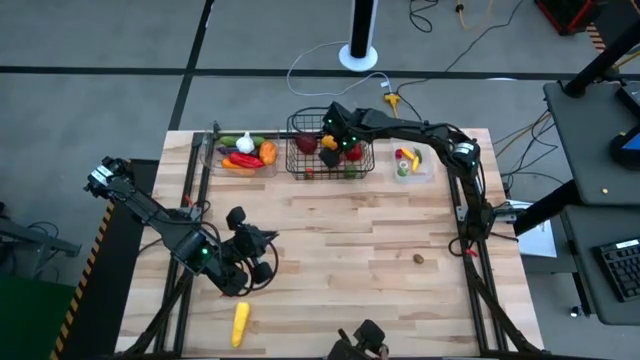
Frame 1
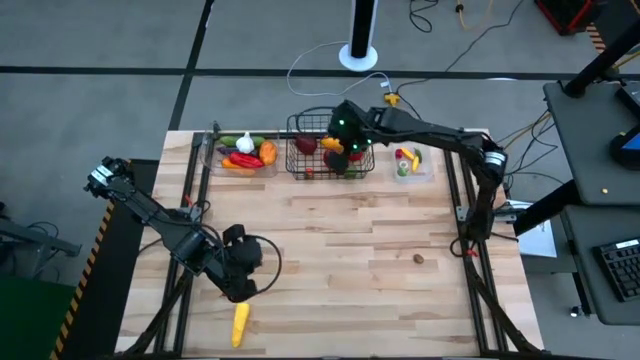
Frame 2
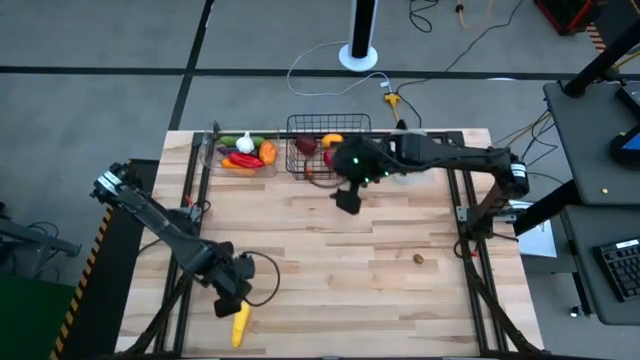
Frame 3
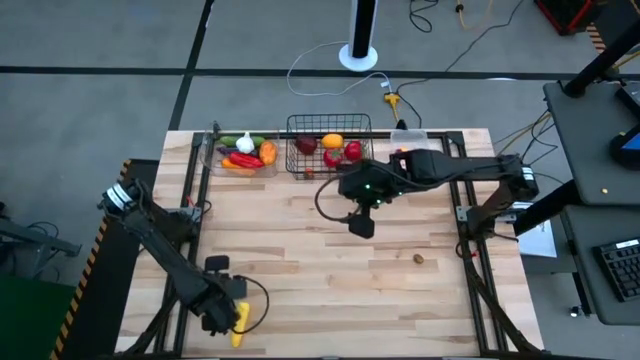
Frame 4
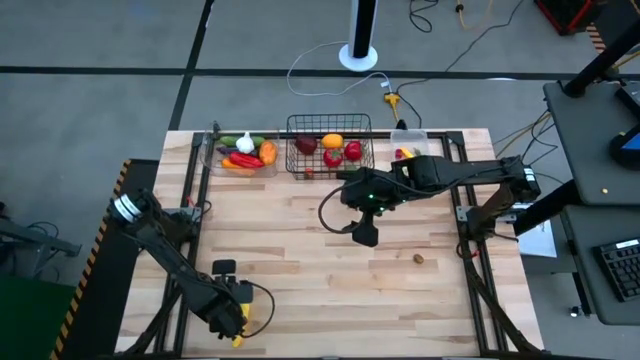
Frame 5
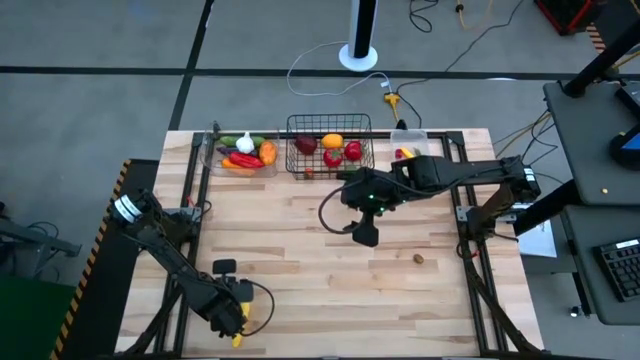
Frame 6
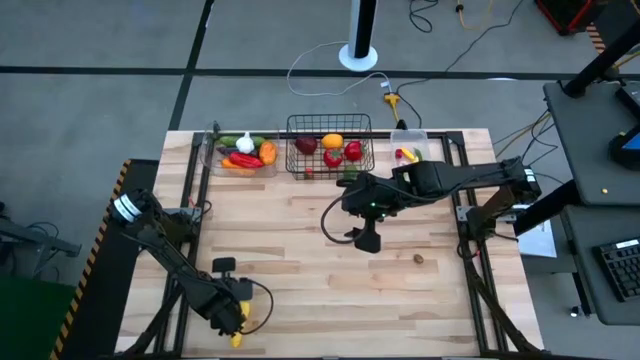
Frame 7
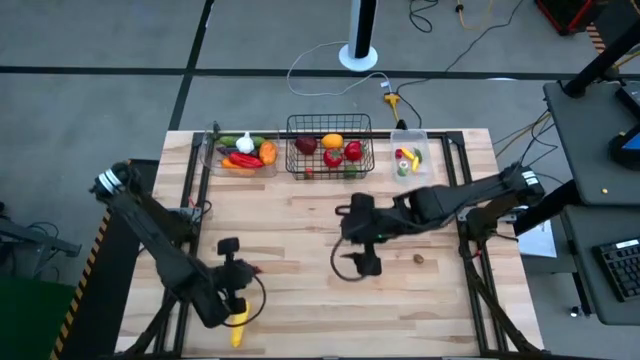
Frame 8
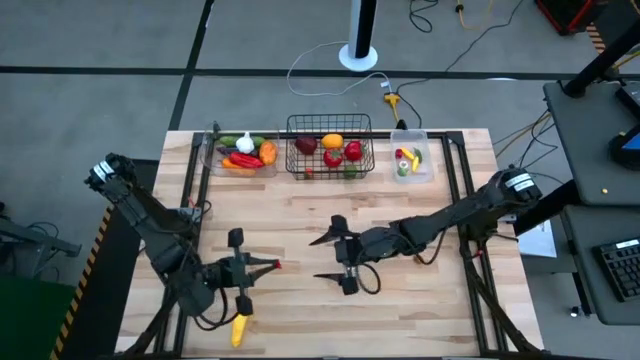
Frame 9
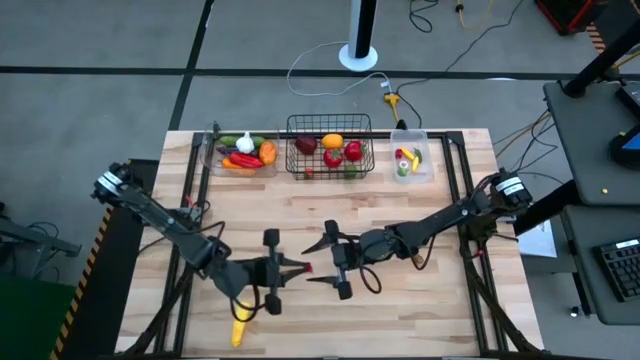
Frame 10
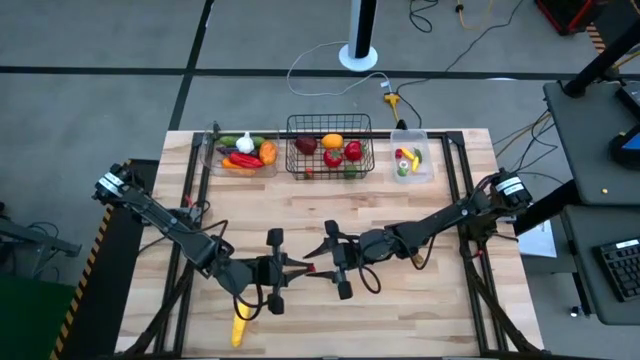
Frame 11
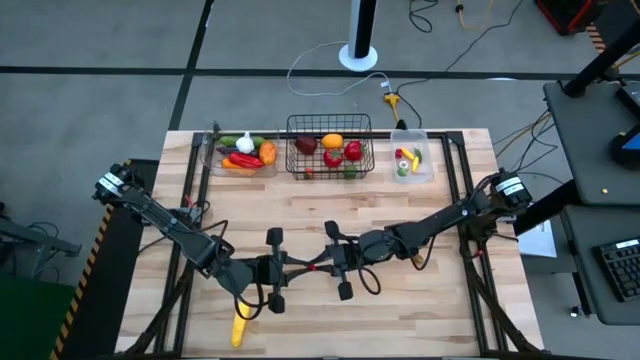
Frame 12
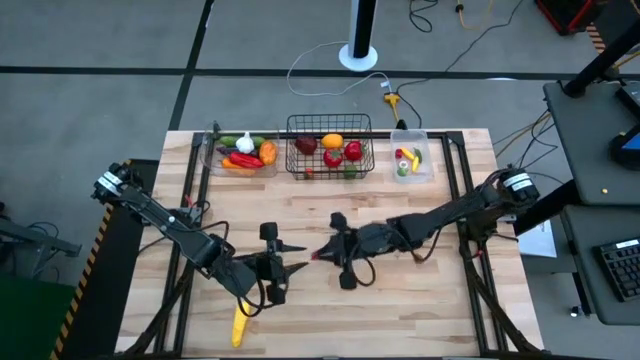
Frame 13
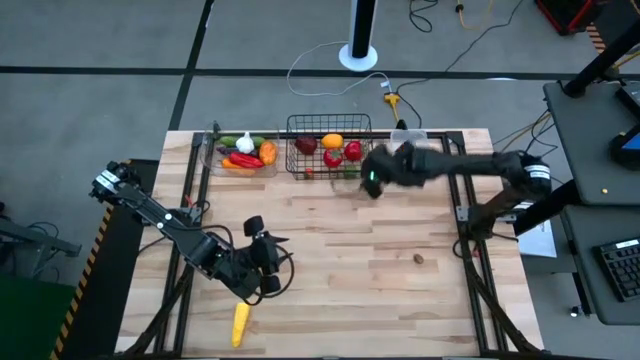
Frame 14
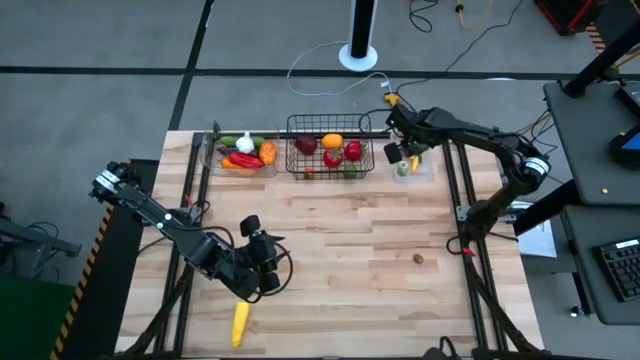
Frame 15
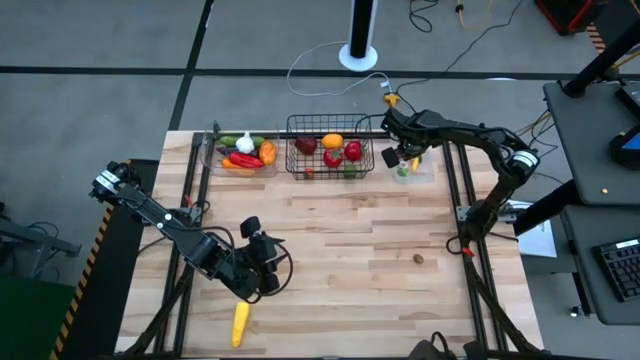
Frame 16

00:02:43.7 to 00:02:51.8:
Task: Sort produce into baskets
Put the red jalapeno pepper into the white bin

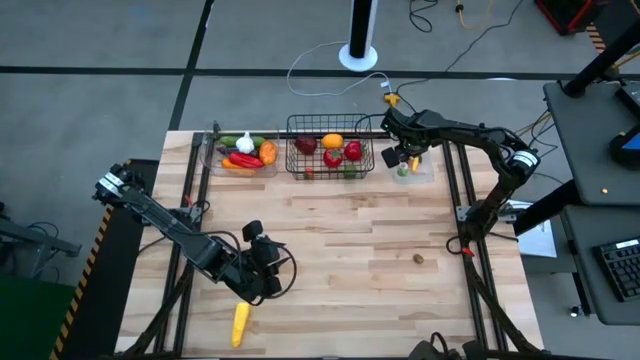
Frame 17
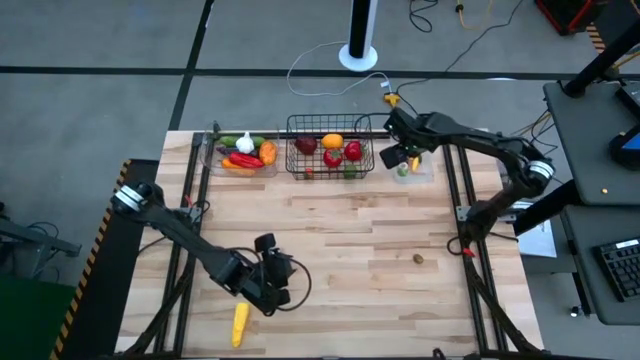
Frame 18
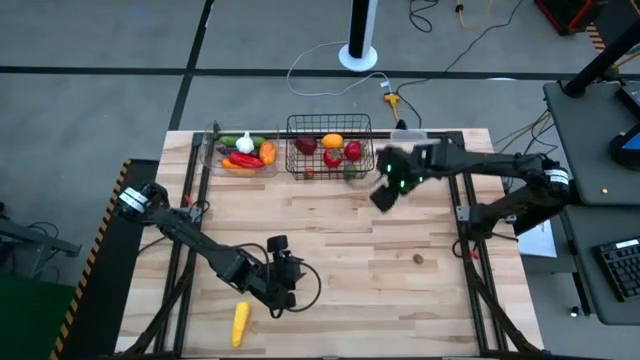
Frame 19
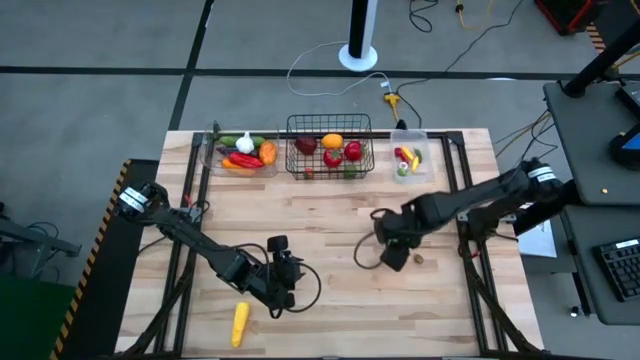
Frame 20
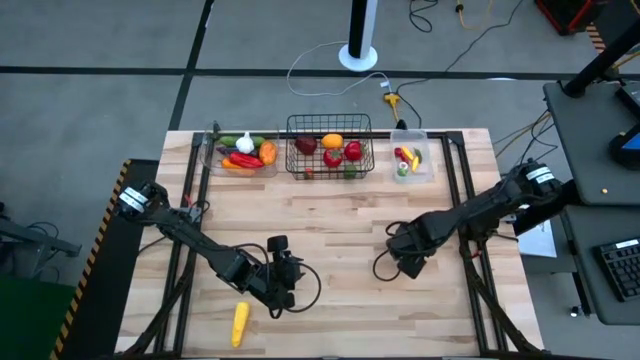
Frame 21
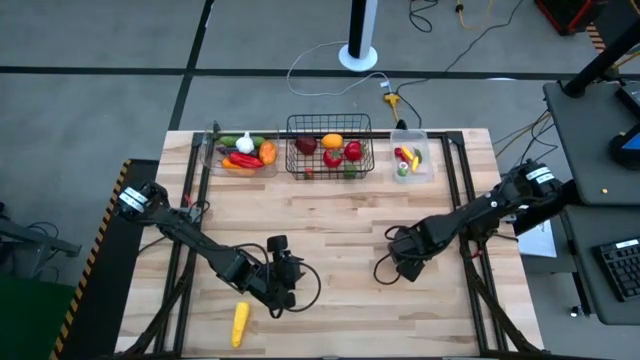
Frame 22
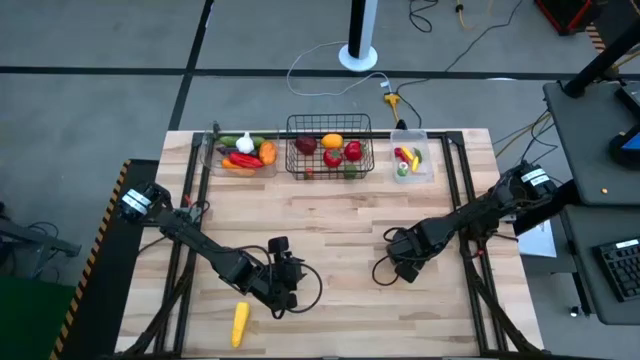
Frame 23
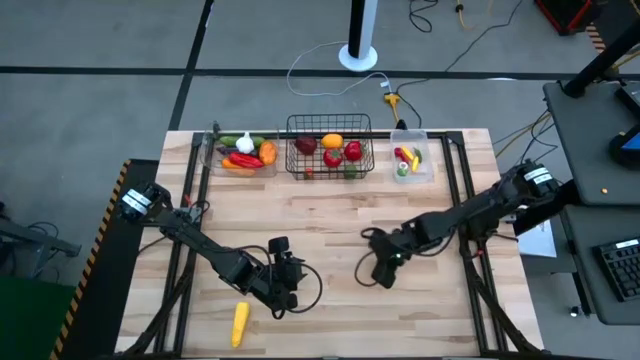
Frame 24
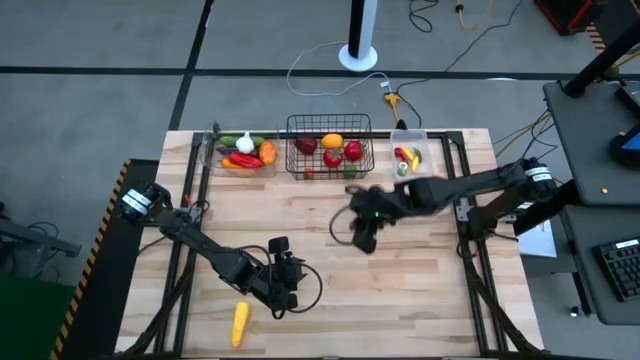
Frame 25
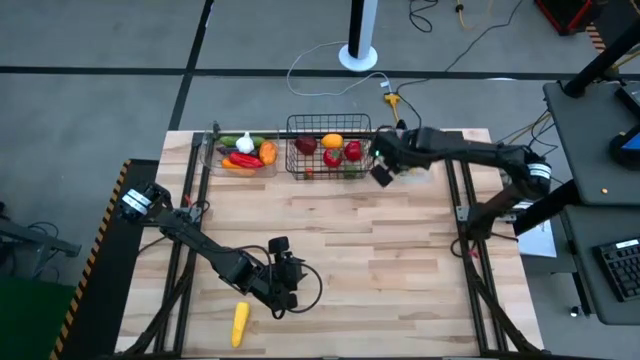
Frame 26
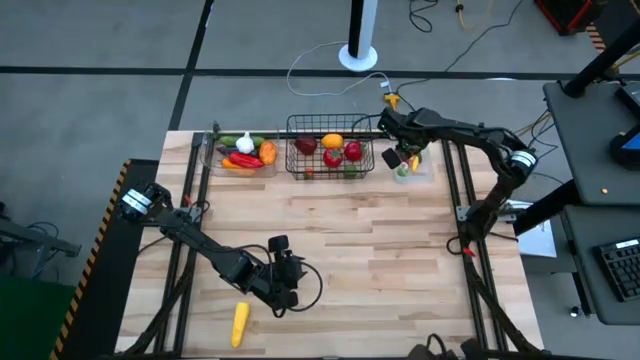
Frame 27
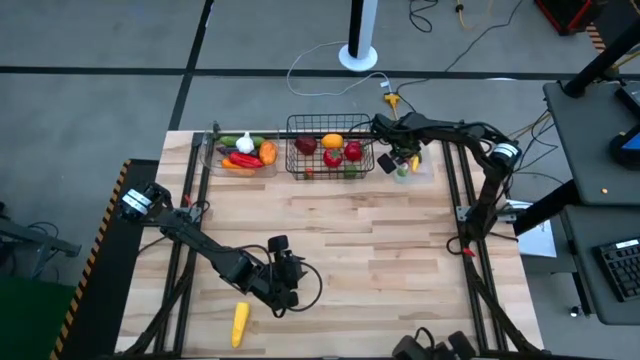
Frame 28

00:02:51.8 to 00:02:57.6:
Put the green olive into the white bin

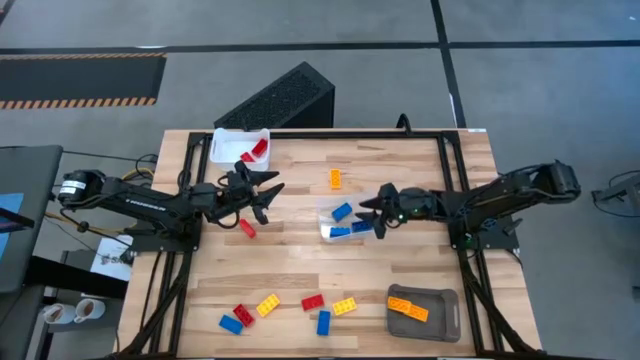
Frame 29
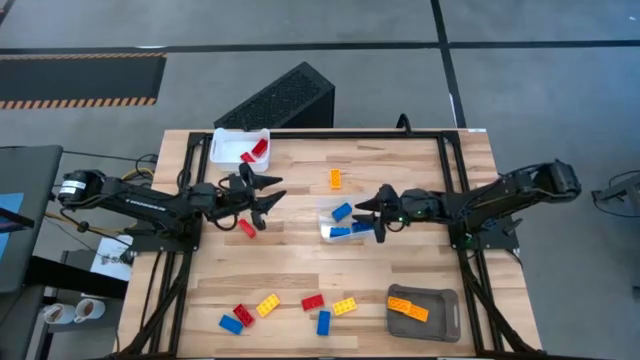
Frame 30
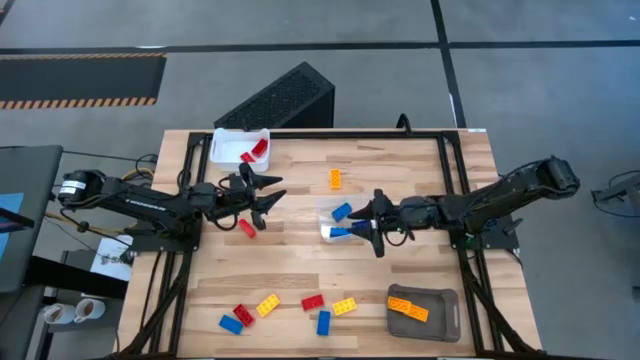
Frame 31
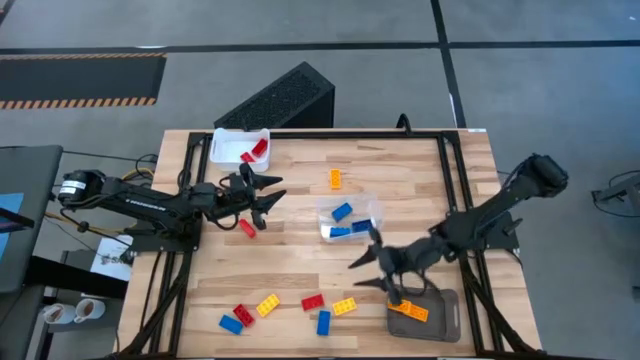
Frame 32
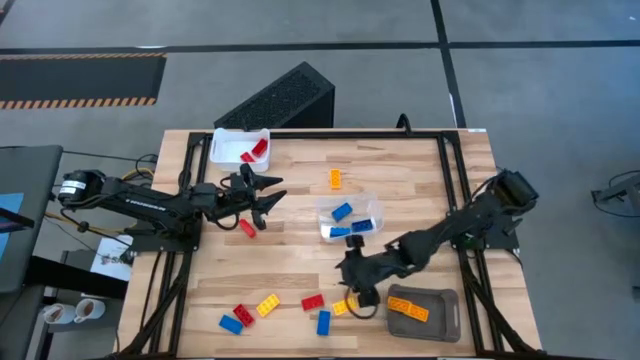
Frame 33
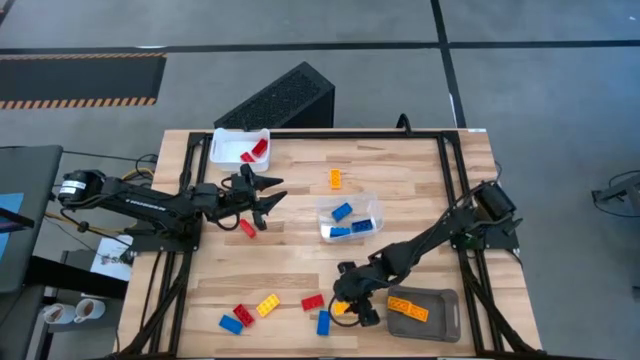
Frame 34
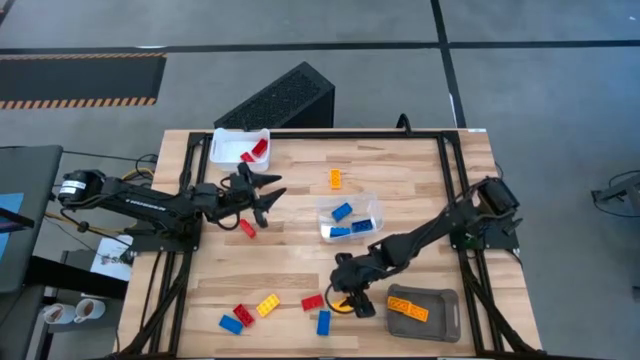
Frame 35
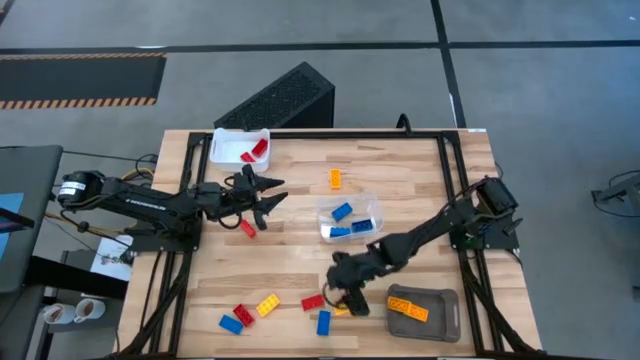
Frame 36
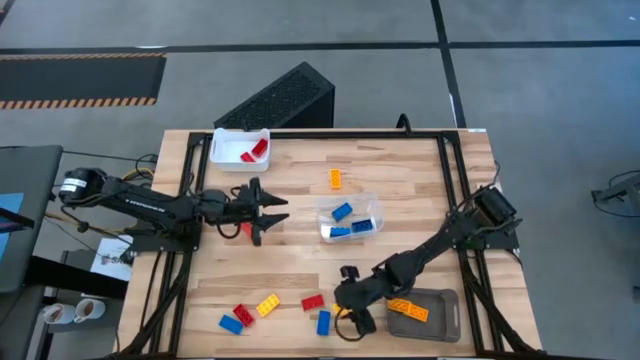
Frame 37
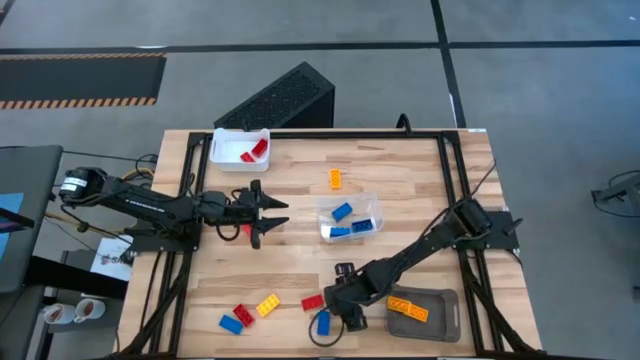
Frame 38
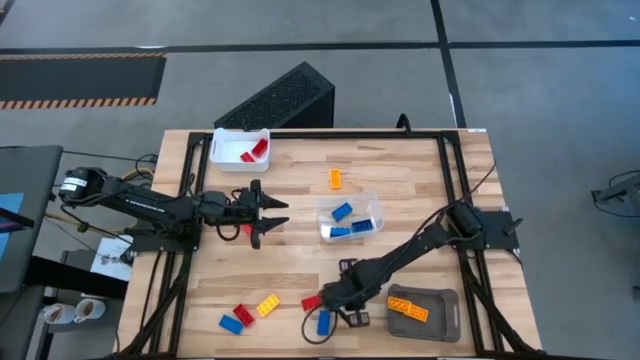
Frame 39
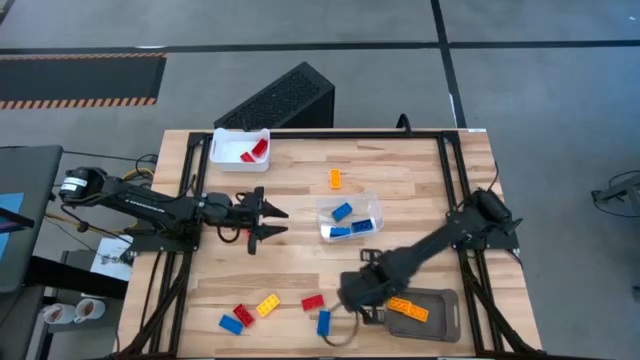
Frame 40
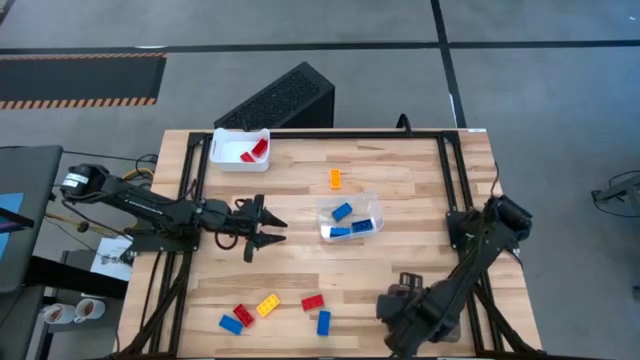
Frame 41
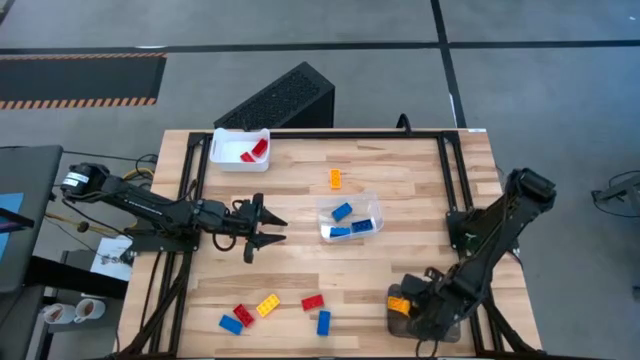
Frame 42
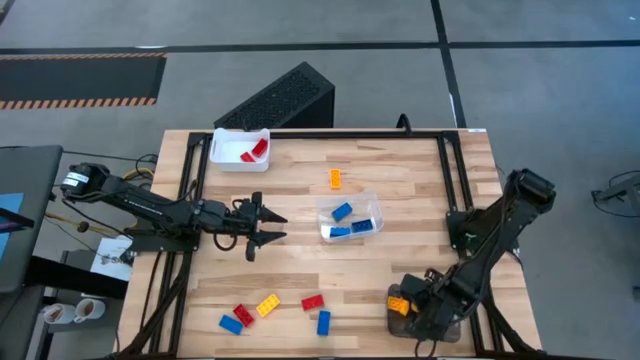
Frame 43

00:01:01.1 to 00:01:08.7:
Task: Sort & place blocks by color
Put the yellow game piece into the black bin
